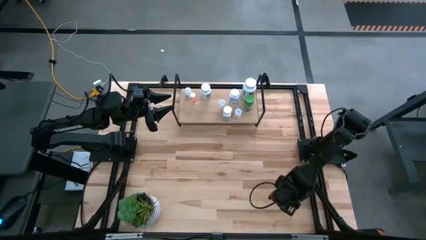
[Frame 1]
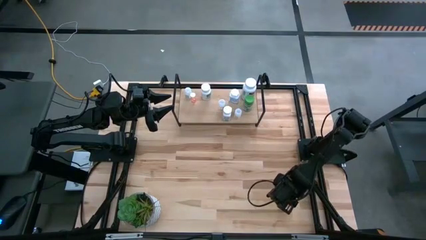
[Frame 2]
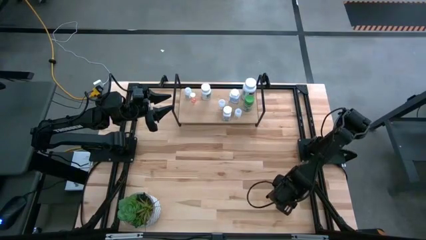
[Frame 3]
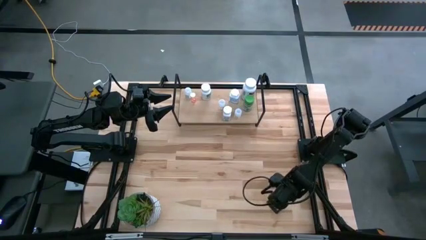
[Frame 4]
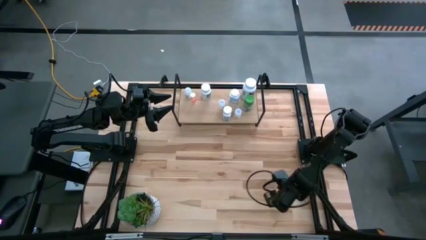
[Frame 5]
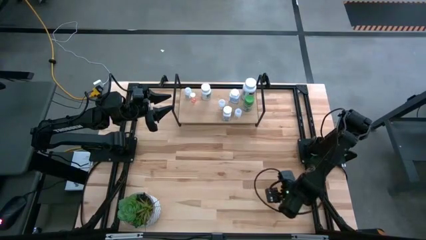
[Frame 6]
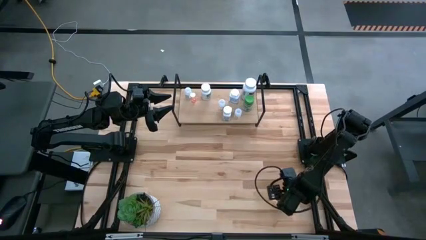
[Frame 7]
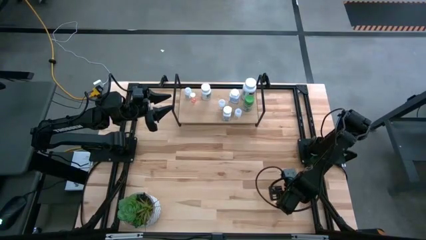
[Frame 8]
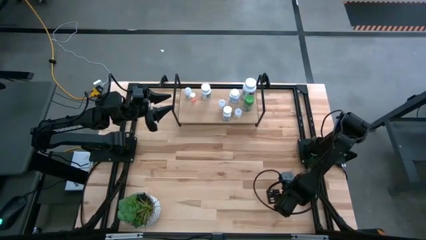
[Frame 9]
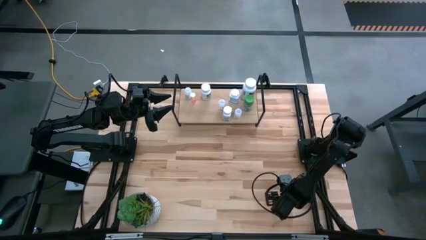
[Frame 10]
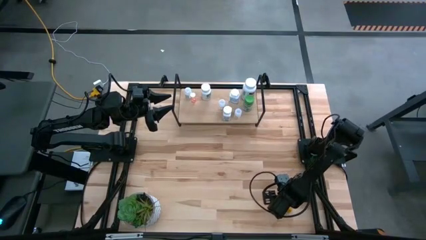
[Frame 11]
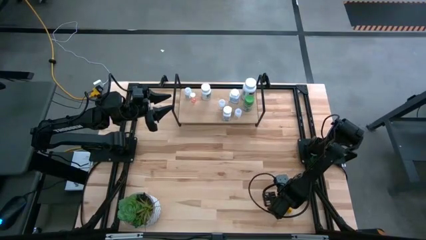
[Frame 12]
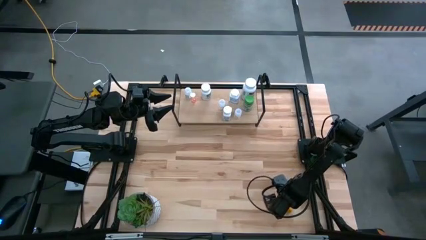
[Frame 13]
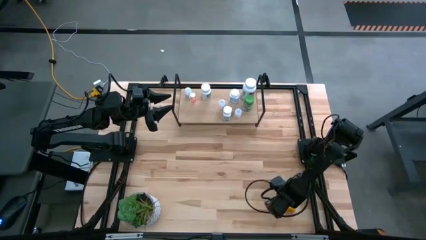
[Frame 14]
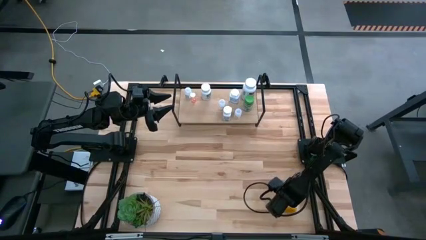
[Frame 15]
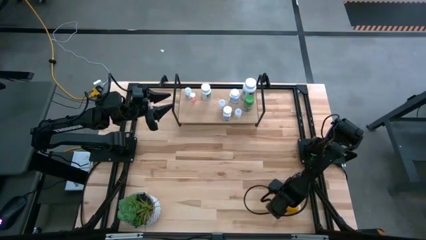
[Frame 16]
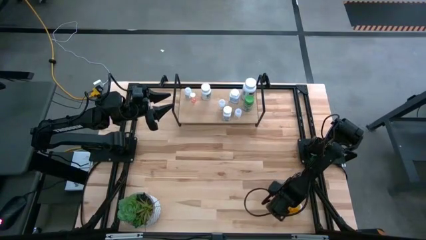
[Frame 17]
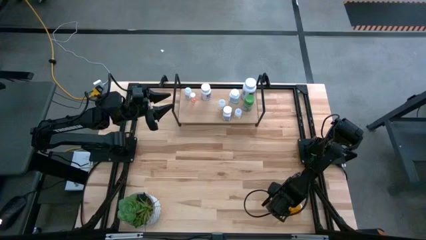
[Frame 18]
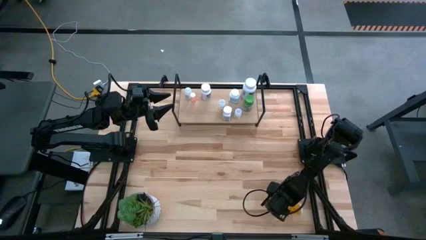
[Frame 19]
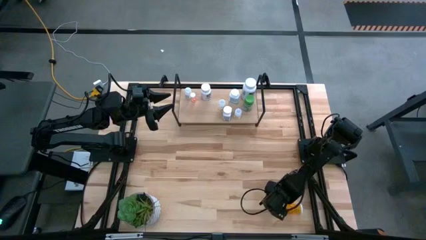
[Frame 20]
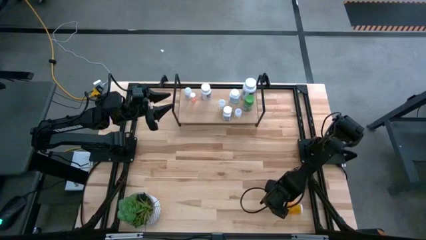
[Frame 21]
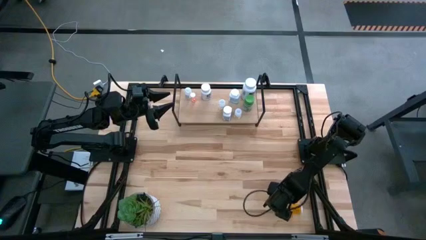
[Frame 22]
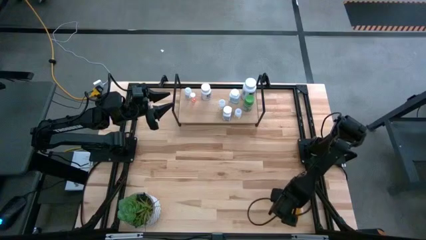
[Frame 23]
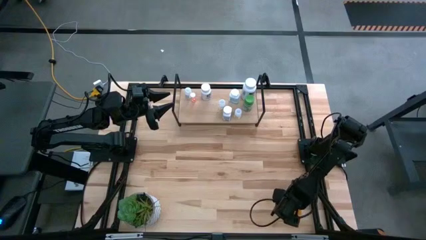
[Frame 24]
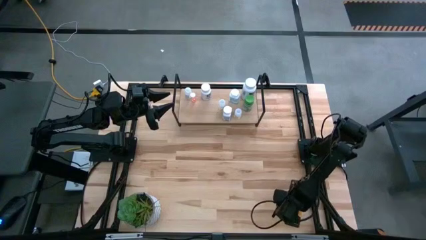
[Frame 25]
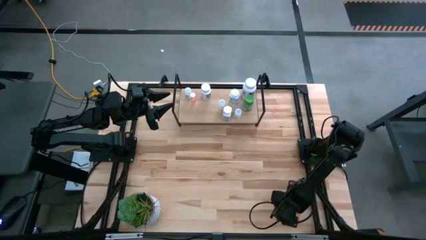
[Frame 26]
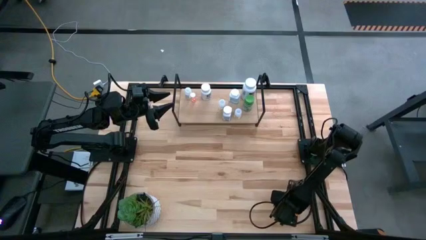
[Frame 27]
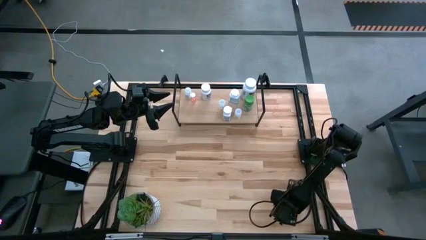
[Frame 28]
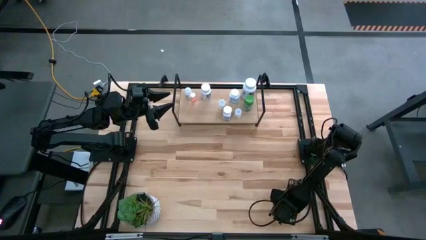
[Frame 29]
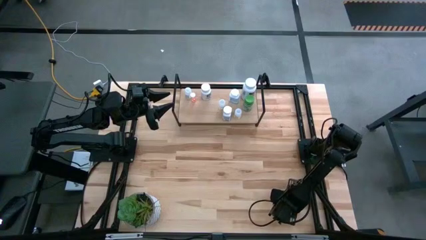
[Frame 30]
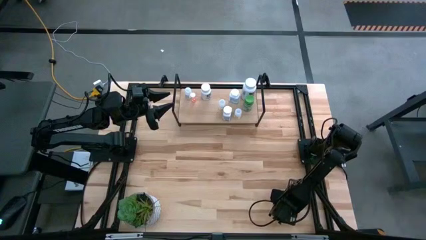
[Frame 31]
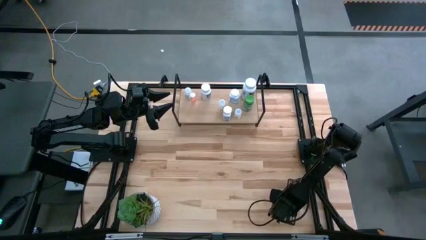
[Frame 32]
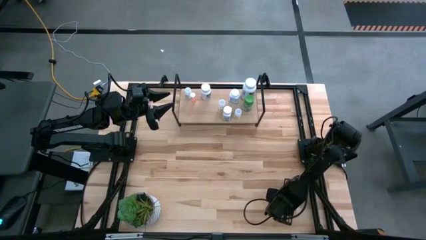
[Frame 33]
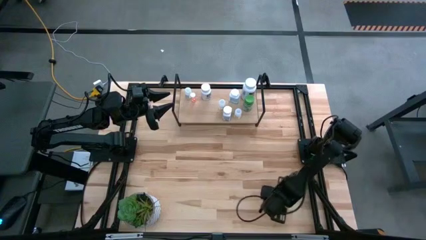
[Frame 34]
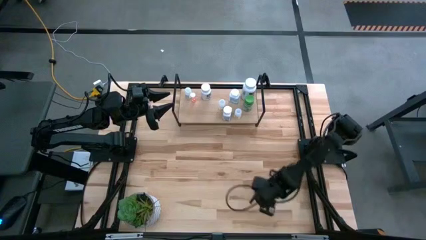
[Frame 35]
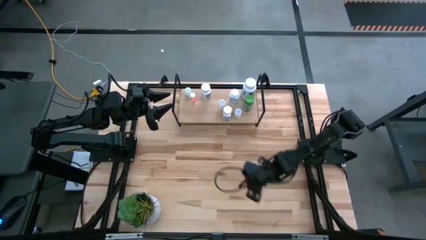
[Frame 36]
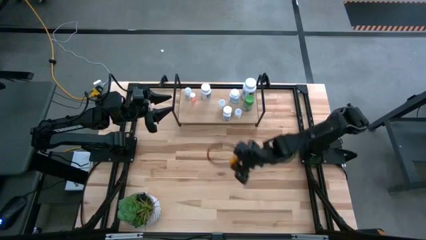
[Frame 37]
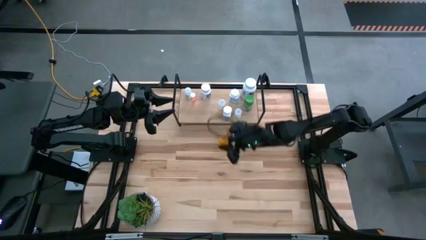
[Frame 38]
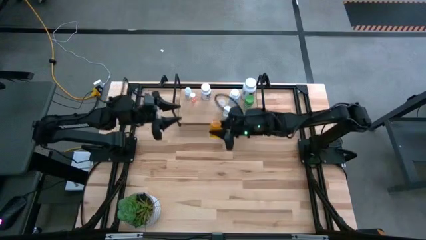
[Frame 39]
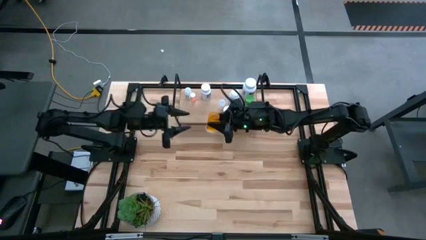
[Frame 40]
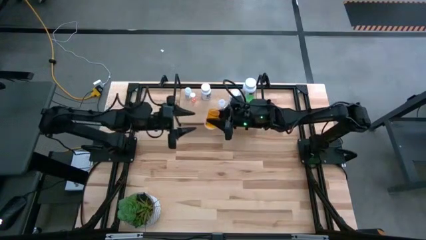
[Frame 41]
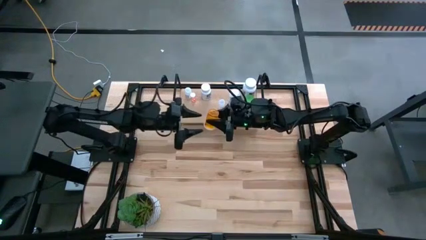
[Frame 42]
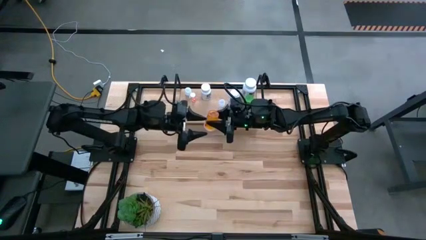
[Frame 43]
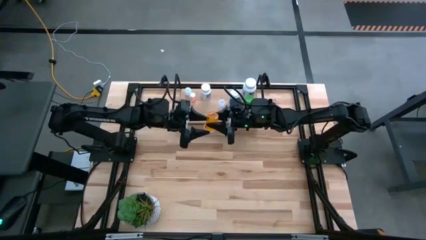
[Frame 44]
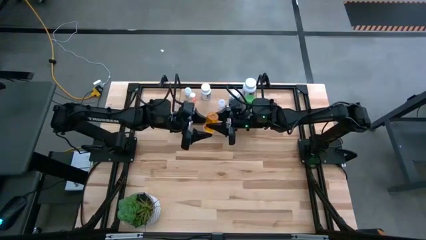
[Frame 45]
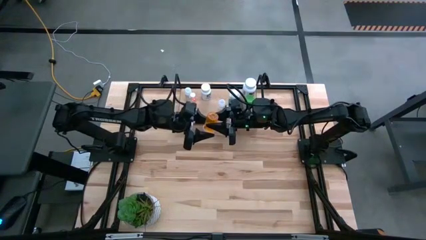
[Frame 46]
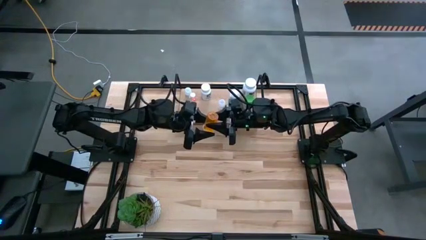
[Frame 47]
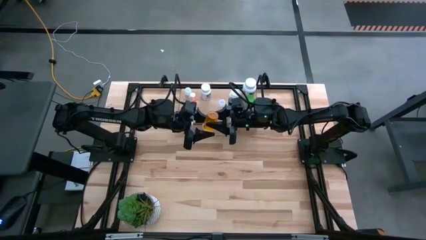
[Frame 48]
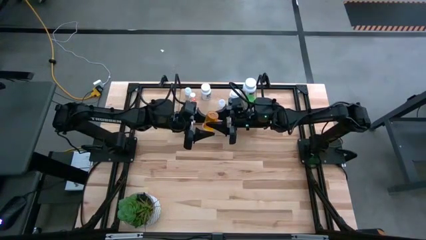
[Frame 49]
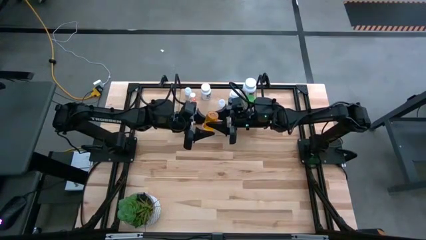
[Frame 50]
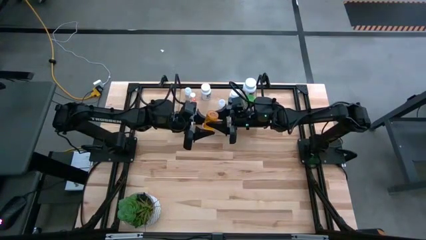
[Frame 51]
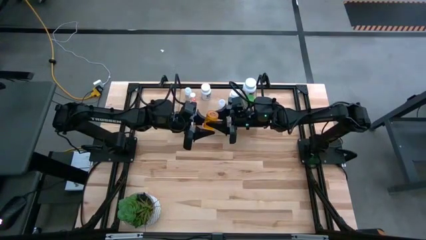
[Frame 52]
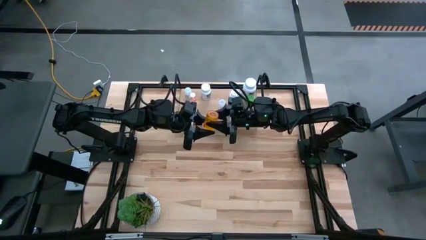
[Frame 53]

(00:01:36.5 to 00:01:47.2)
Task: Pick and place medicine bottles onto shelf by color
Put the orange pill bottle on the shelf
